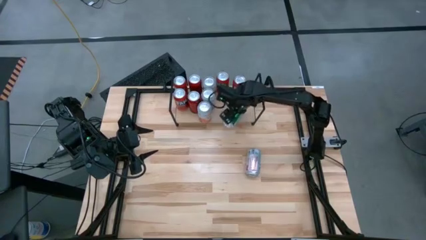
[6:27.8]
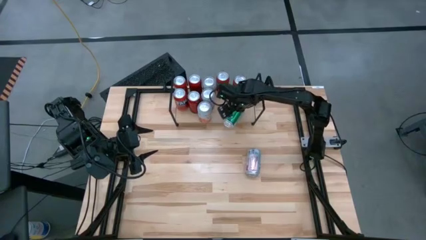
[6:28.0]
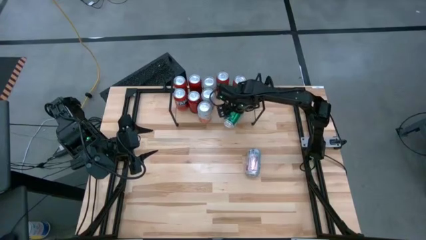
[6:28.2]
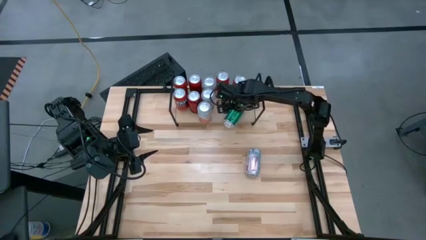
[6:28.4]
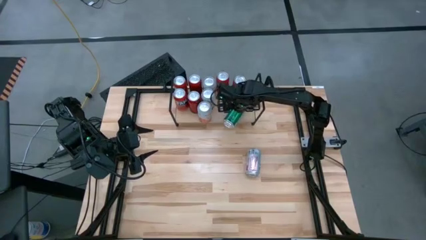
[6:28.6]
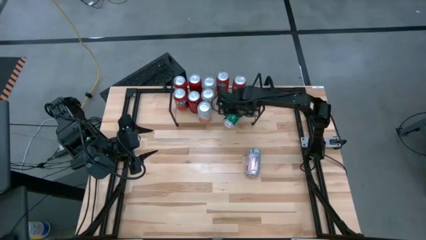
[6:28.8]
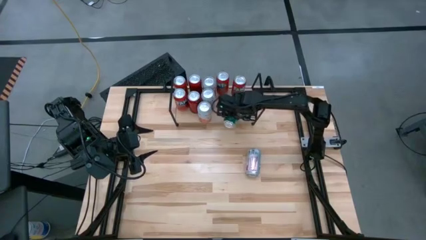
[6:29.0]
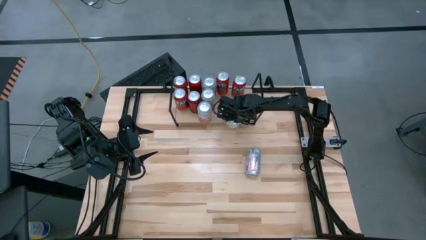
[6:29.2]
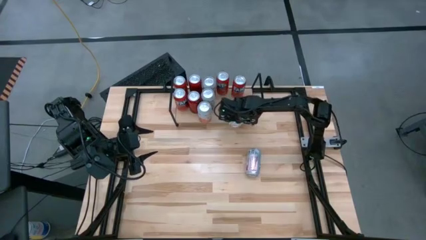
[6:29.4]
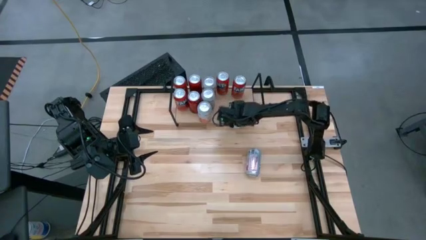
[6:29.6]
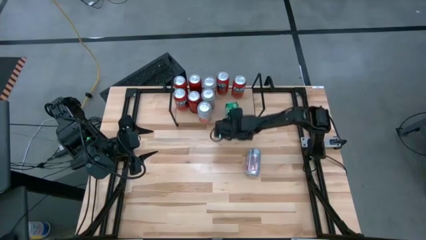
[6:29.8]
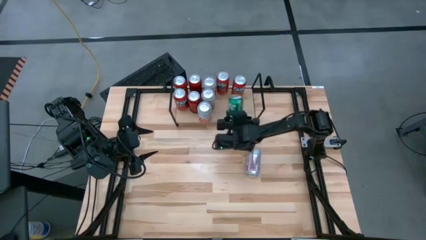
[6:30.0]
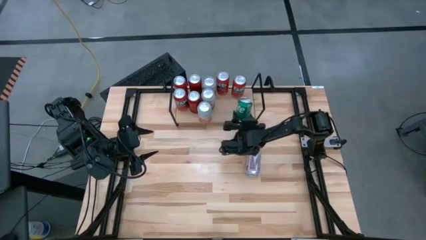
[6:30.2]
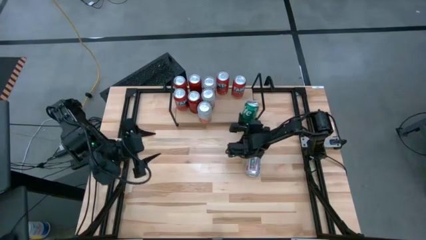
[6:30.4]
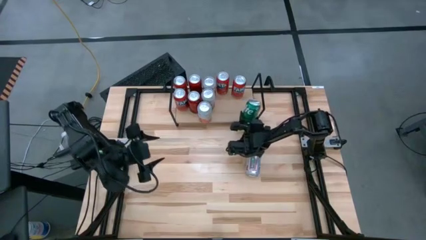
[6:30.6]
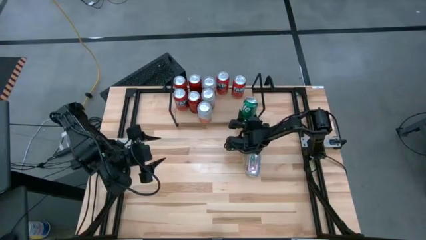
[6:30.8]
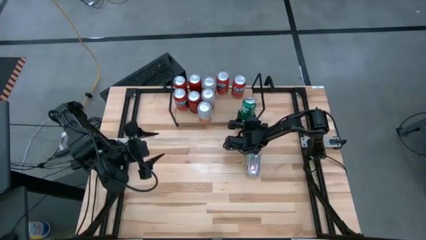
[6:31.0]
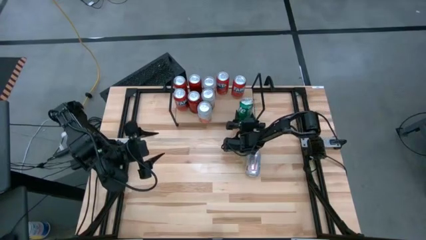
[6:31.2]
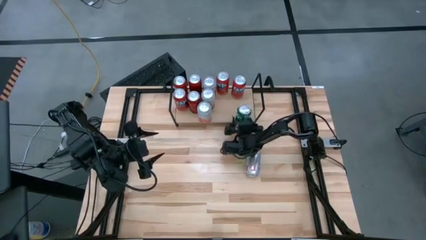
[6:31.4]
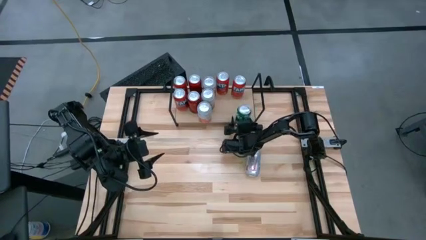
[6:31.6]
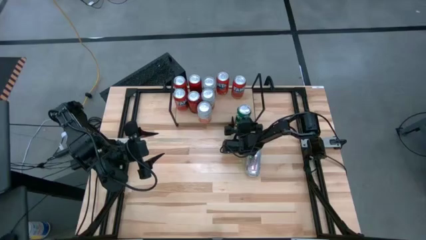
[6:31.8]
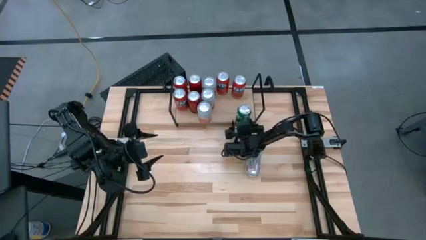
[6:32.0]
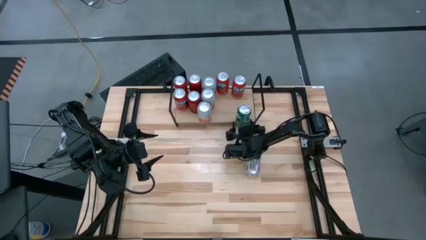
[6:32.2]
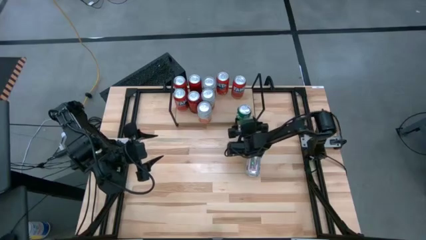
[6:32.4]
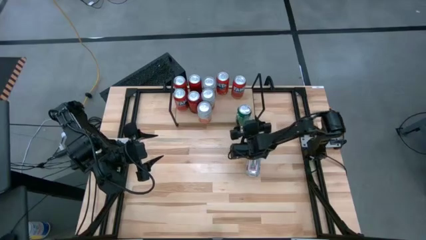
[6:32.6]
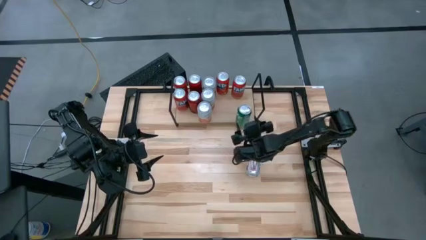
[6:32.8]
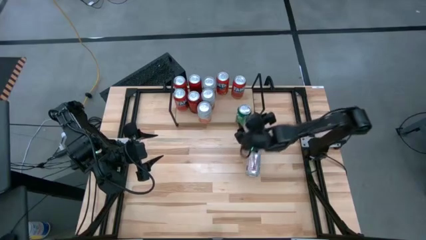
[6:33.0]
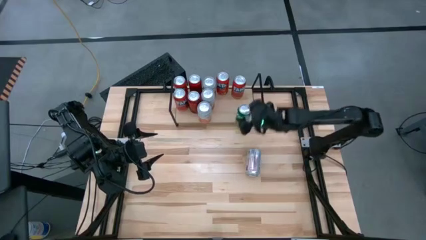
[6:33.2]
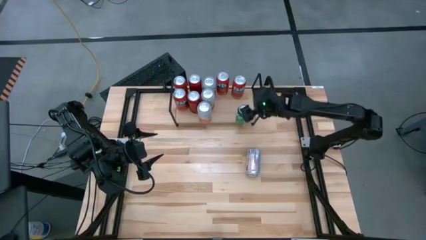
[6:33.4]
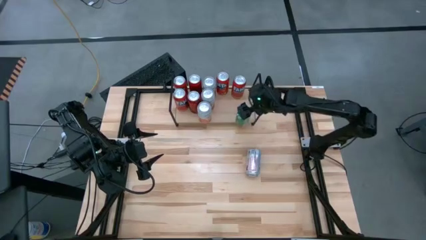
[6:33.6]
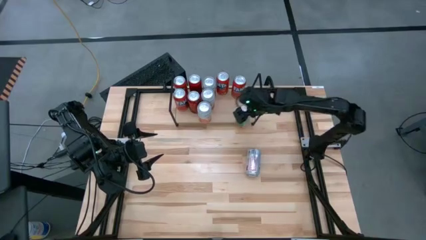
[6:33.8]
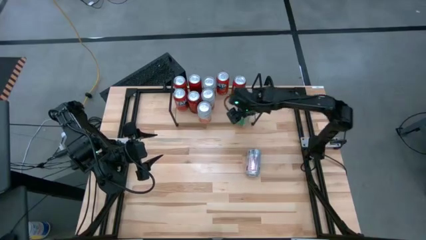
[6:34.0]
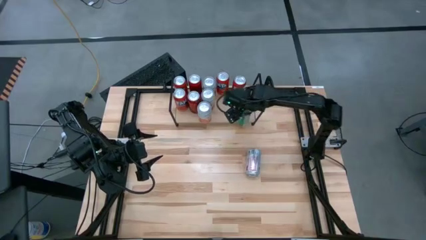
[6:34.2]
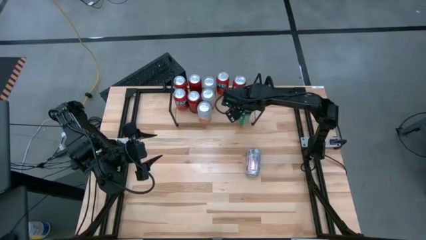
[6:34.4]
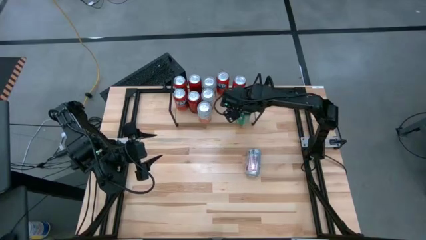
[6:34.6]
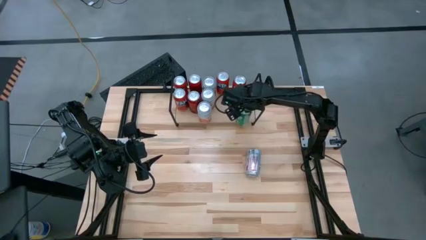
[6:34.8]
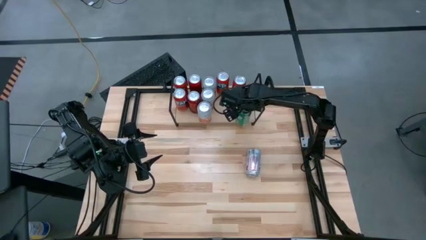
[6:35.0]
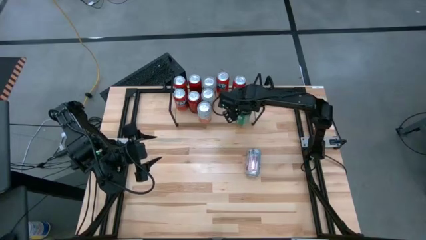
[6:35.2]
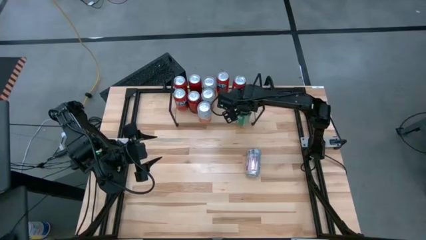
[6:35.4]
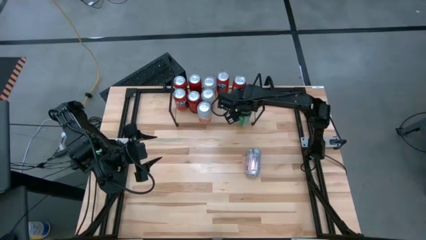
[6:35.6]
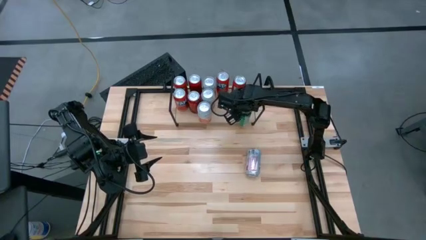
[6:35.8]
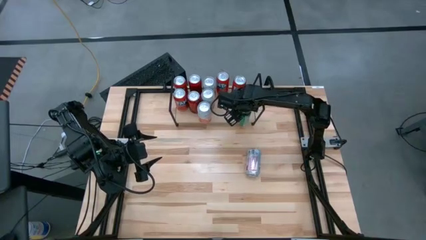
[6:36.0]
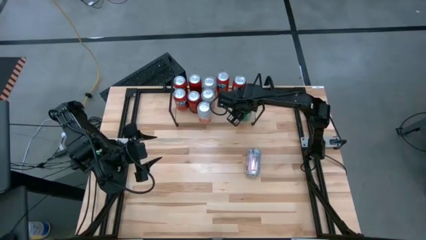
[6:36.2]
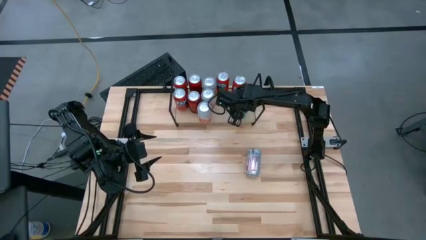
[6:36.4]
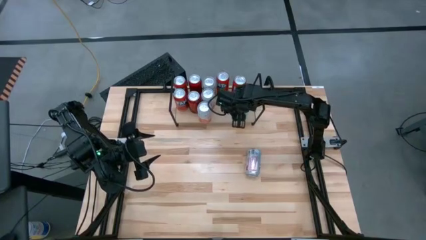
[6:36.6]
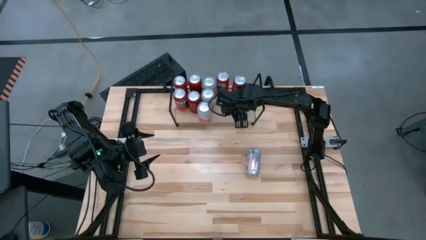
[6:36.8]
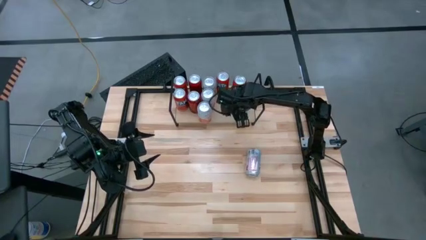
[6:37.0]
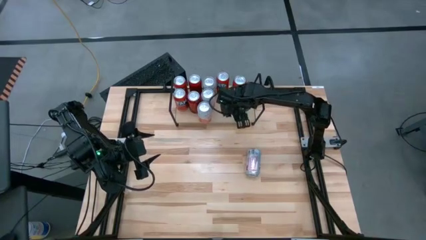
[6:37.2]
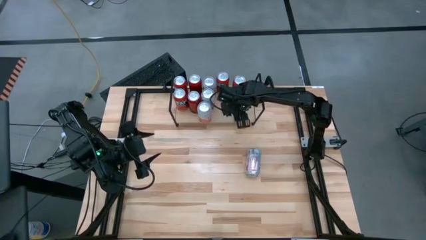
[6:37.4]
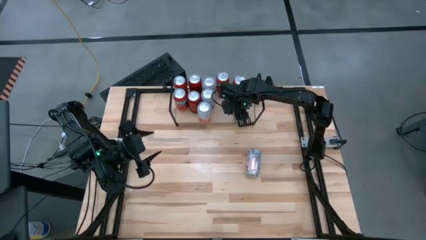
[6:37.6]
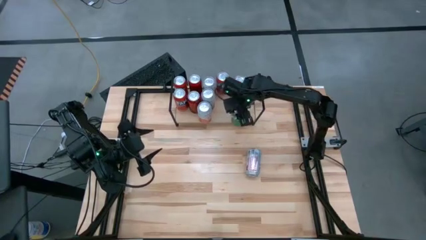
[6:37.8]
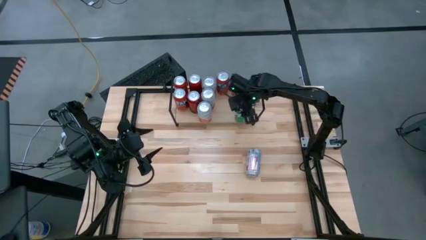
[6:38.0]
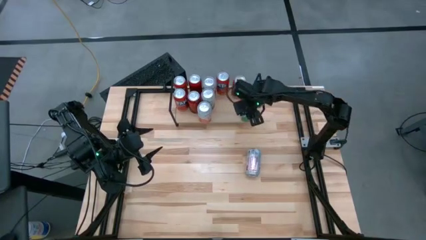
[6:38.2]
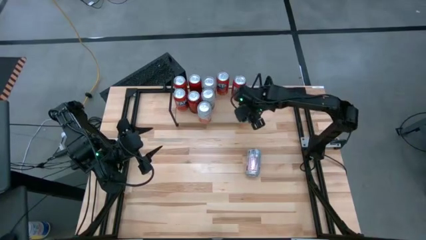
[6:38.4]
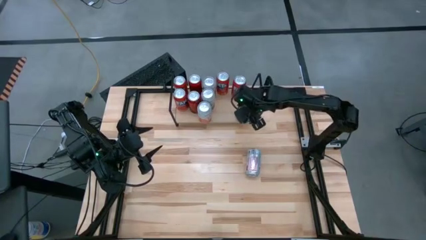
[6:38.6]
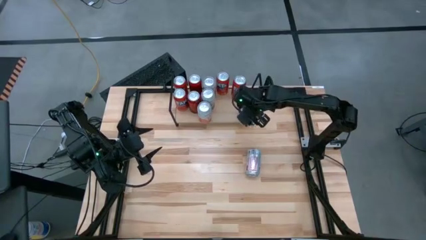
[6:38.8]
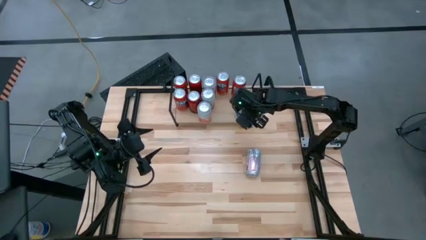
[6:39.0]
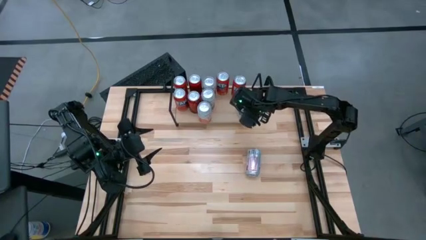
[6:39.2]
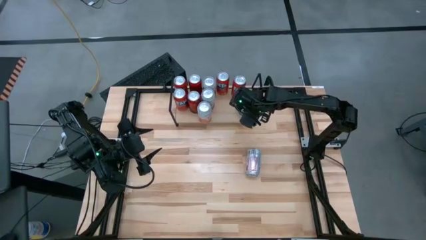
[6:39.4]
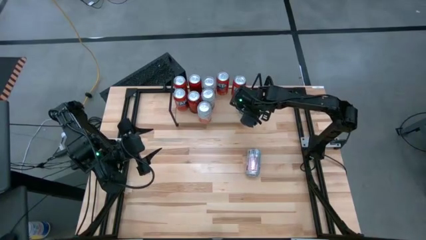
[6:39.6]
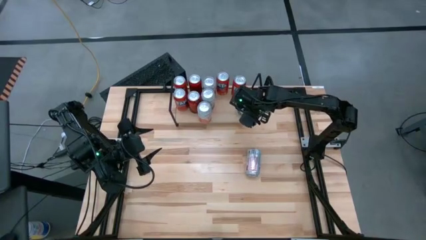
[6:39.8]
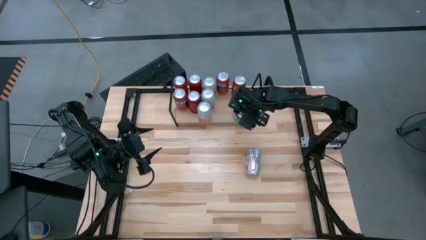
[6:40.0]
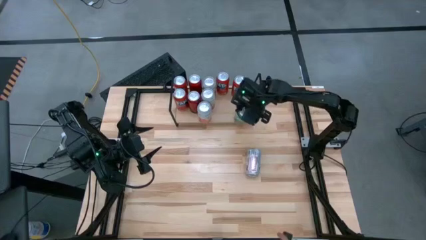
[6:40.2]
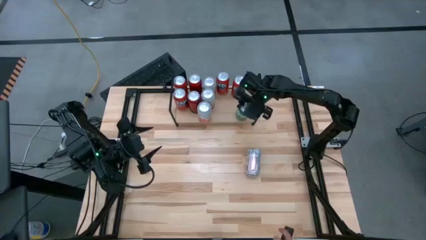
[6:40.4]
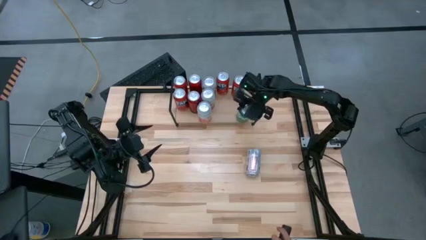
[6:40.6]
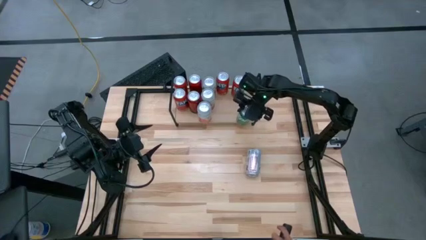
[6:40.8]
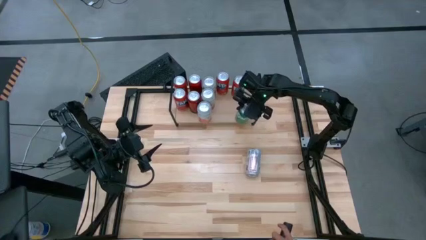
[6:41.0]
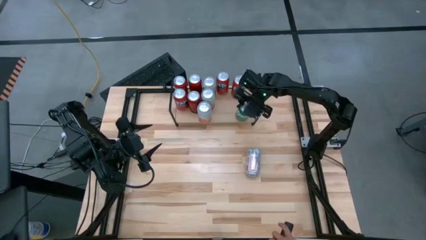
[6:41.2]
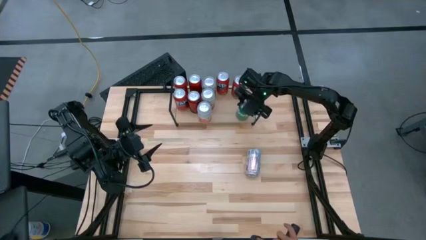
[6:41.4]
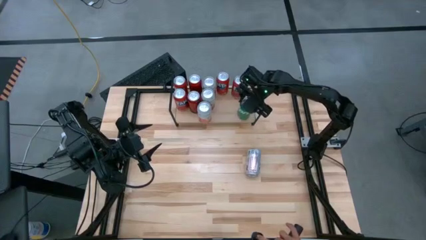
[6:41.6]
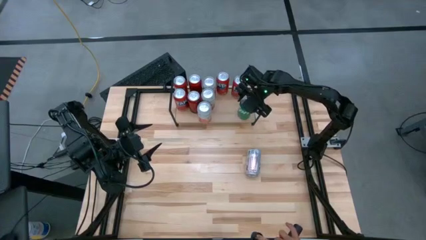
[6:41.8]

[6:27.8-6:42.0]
Task: Place canned beverage on shelf
Put the green soda can on the shelf
